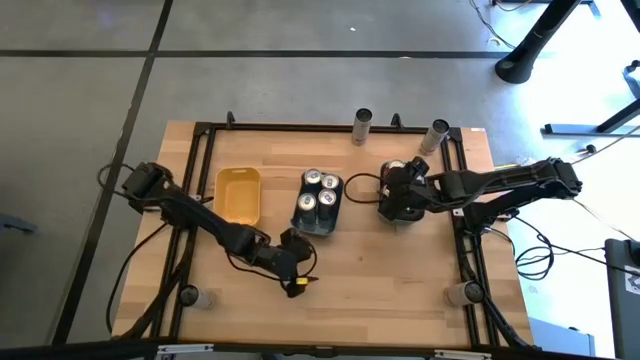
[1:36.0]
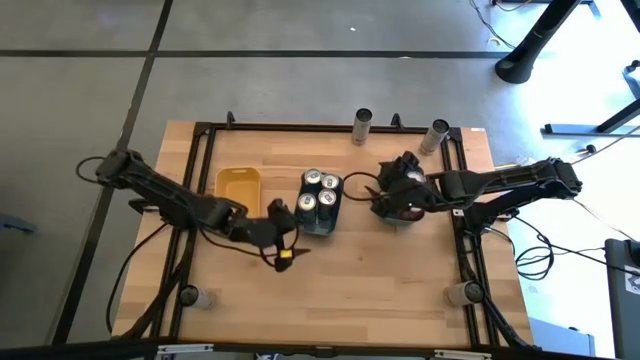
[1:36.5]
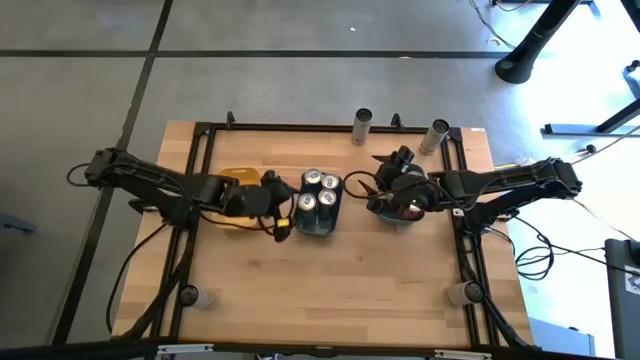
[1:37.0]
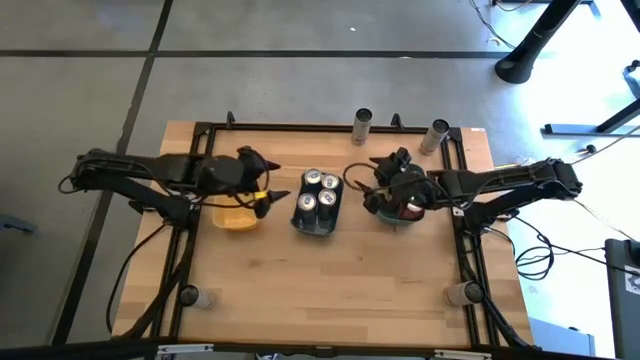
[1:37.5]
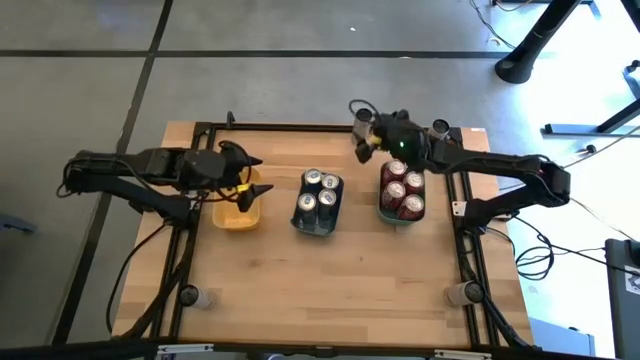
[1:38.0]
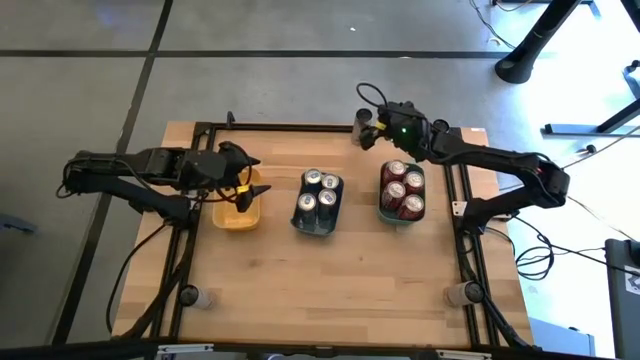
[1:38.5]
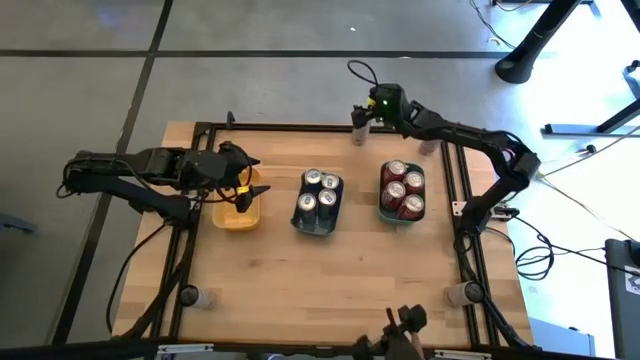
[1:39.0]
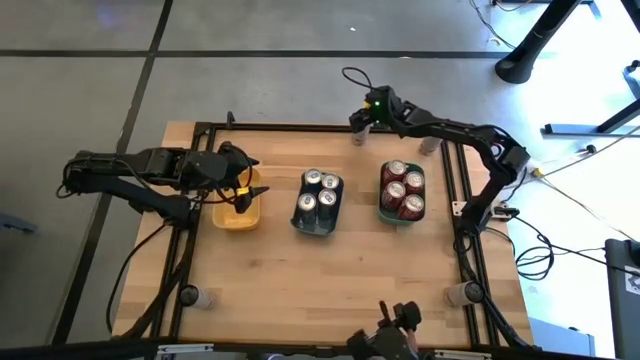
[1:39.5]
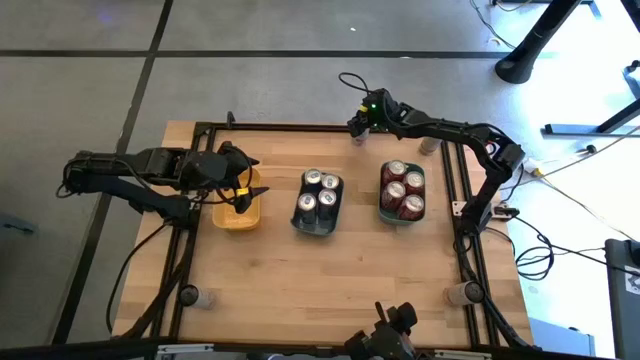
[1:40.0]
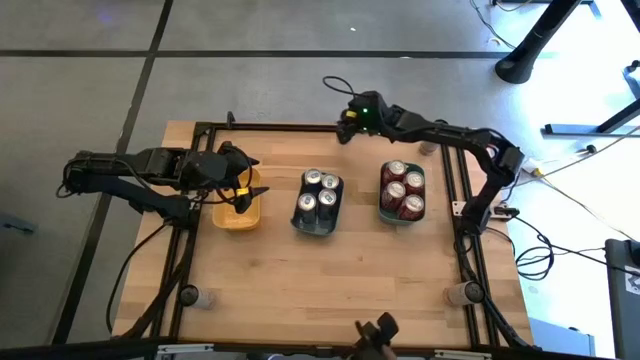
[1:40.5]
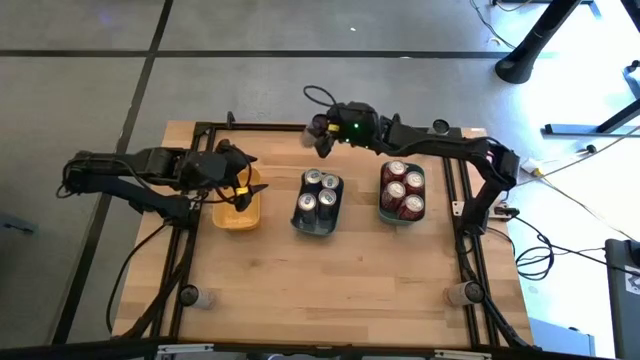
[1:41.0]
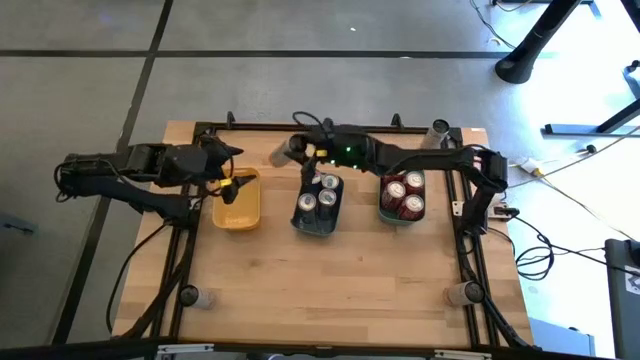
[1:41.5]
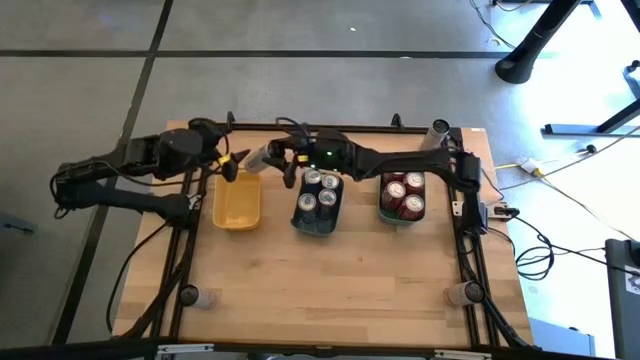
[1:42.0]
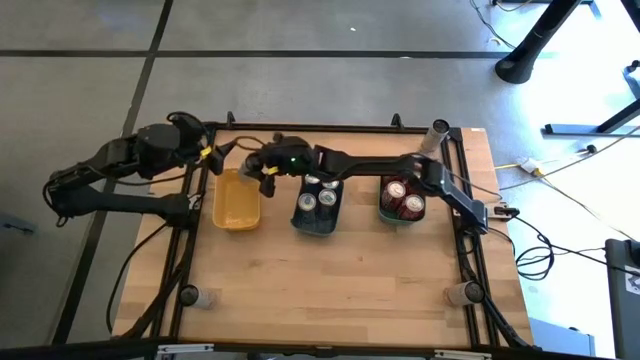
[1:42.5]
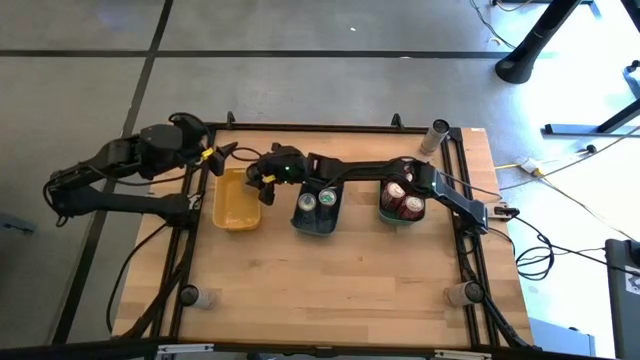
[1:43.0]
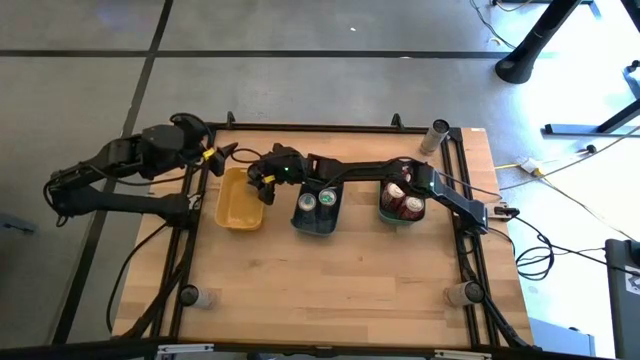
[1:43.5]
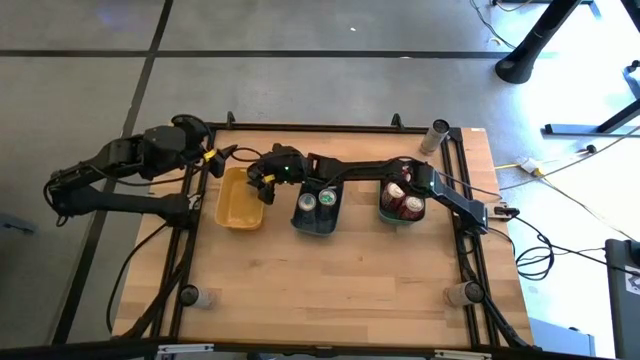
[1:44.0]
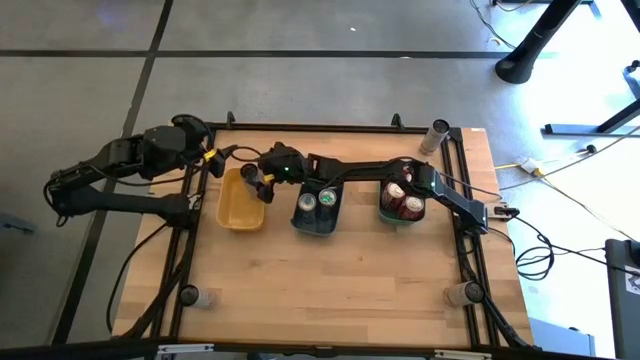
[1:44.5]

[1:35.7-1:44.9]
Task: Sort soda cans
Put the white pink soda can into yellow bin

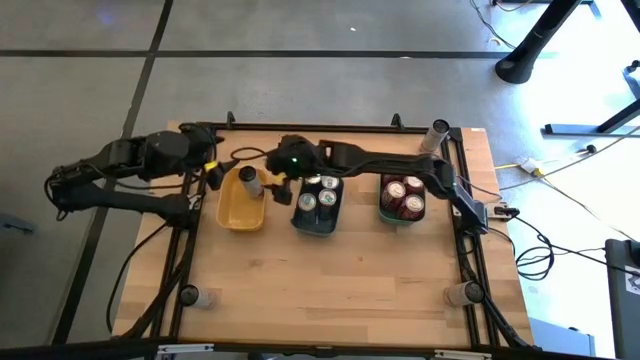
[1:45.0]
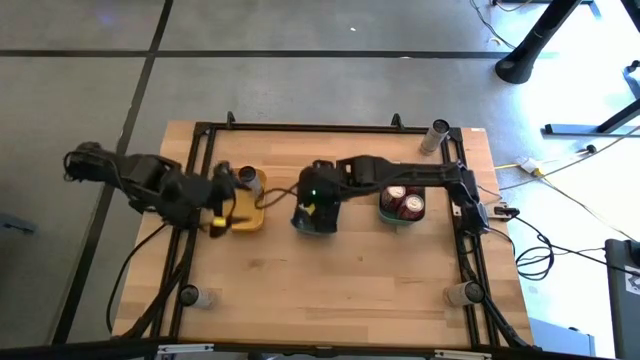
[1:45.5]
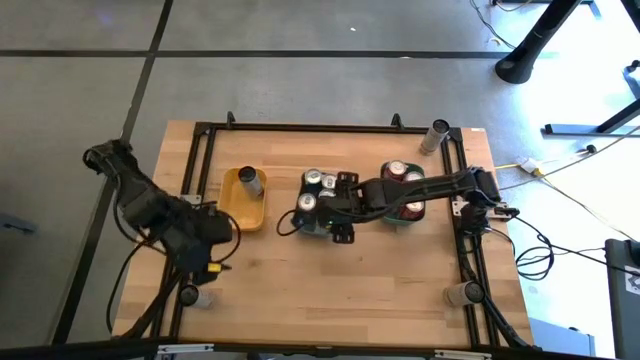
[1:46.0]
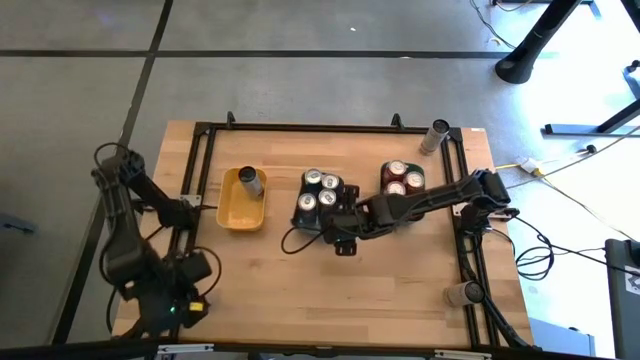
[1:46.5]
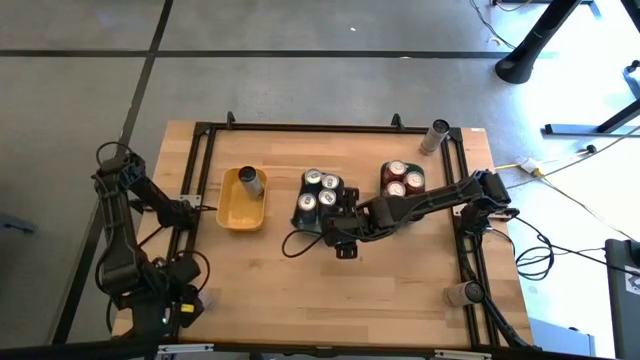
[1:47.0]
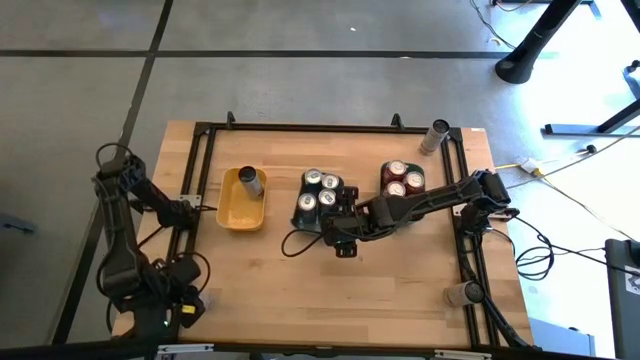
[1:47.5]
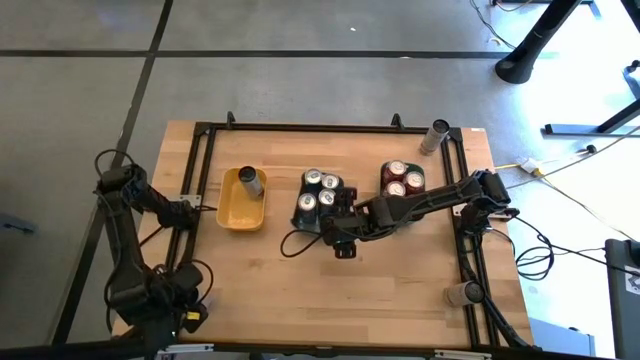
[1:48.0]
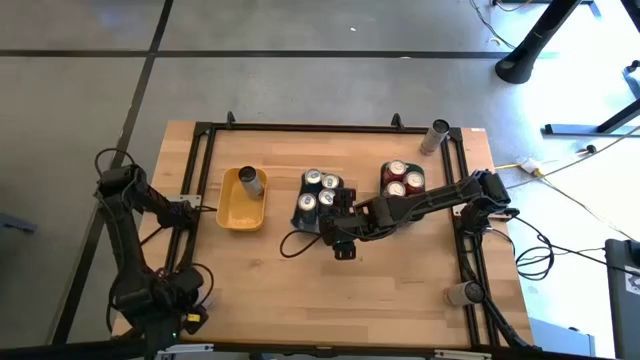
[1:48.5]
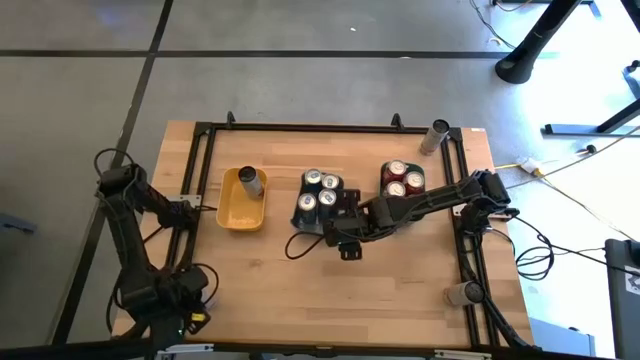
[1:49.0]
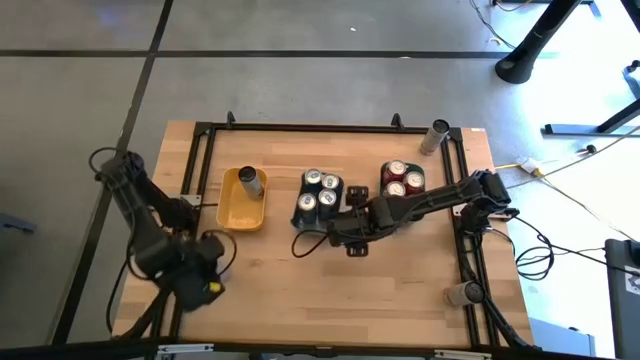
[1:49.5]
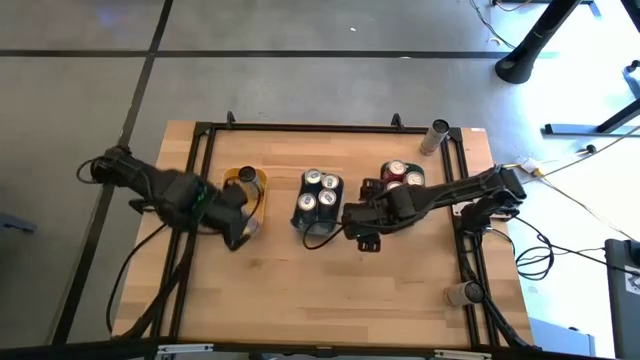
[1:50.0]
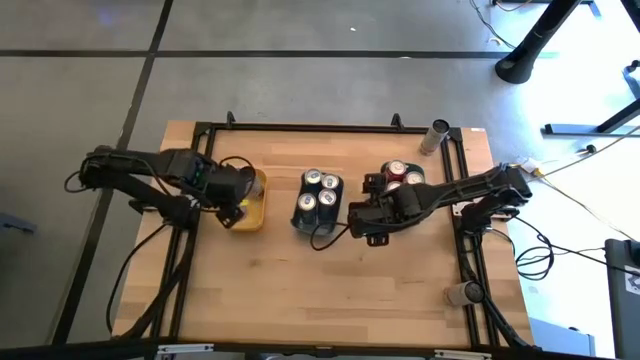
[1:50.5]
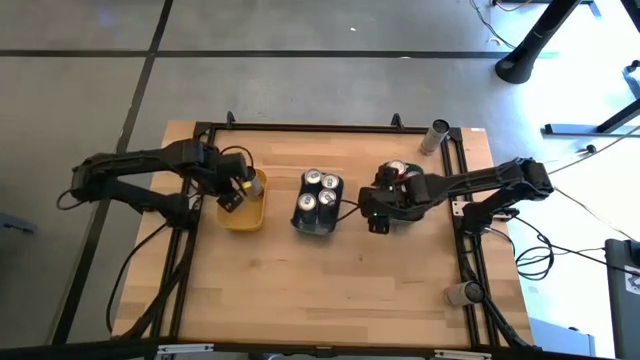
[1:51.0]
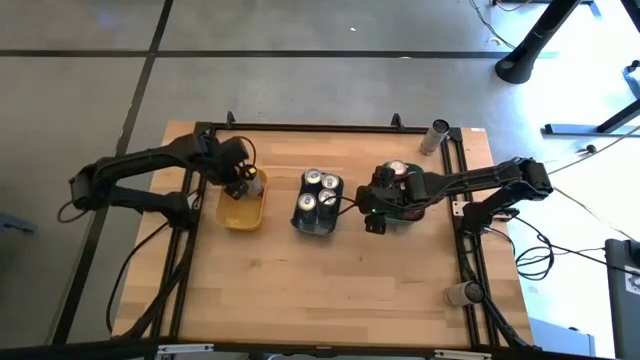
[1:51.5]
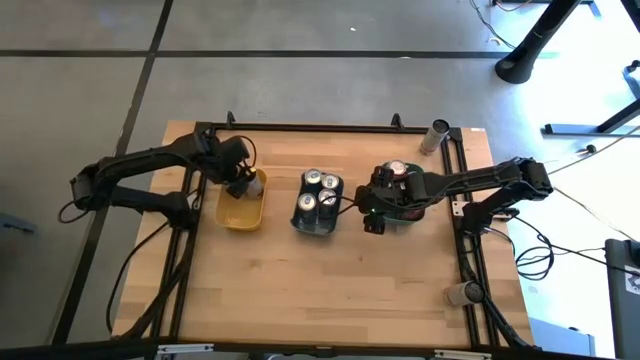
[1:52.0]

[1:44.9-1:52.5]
Put the white pink soda can into yellow bin

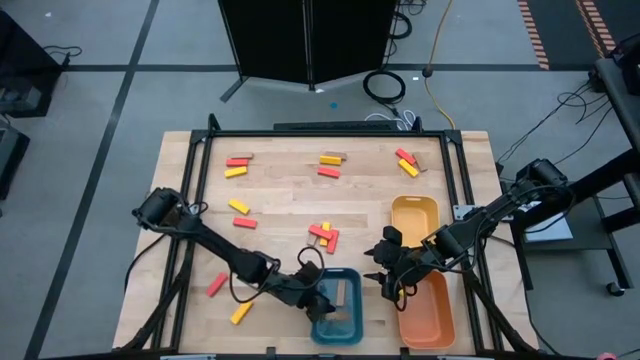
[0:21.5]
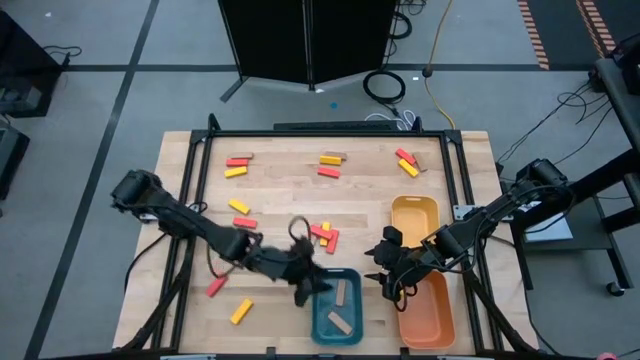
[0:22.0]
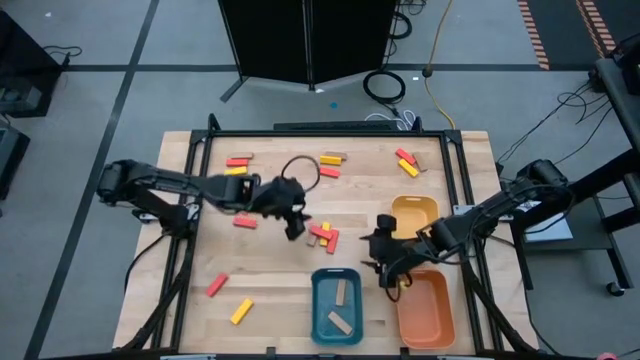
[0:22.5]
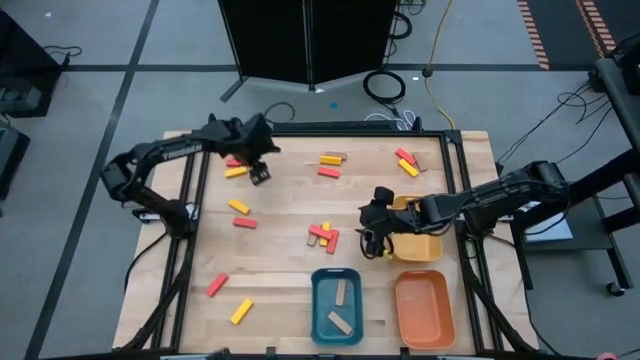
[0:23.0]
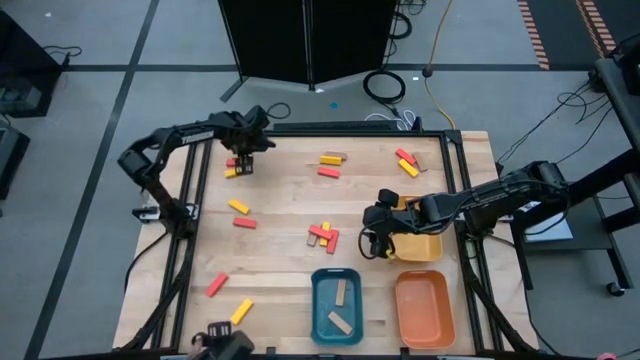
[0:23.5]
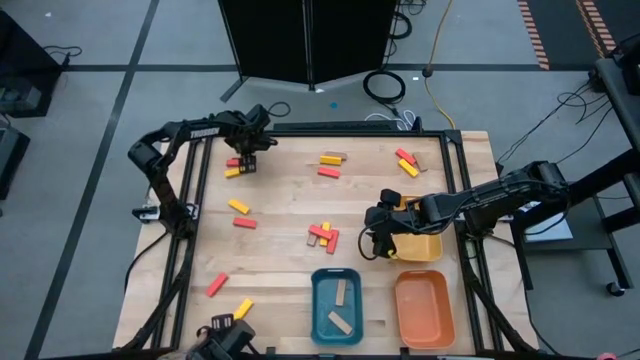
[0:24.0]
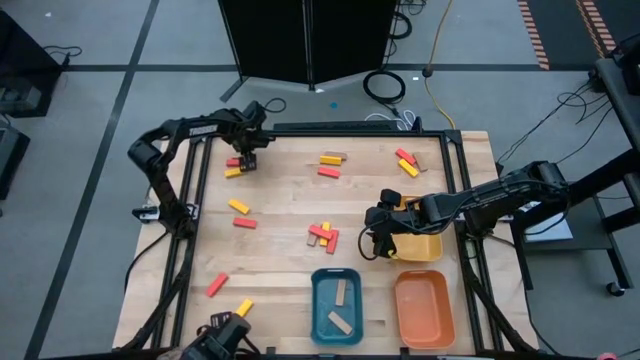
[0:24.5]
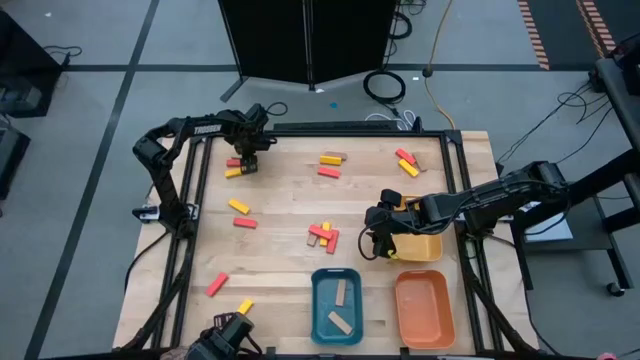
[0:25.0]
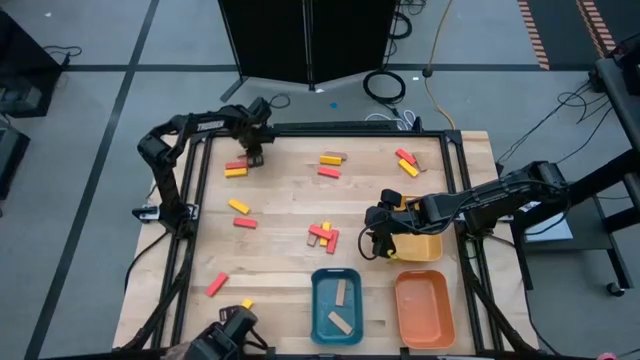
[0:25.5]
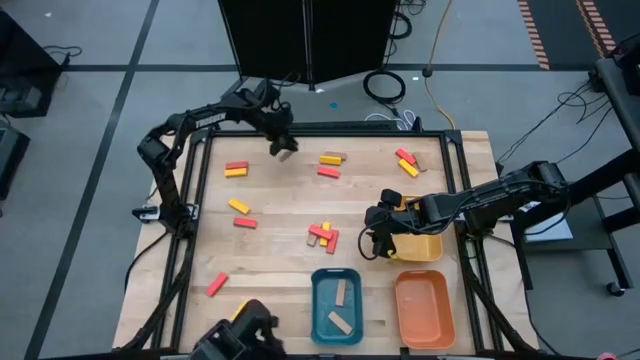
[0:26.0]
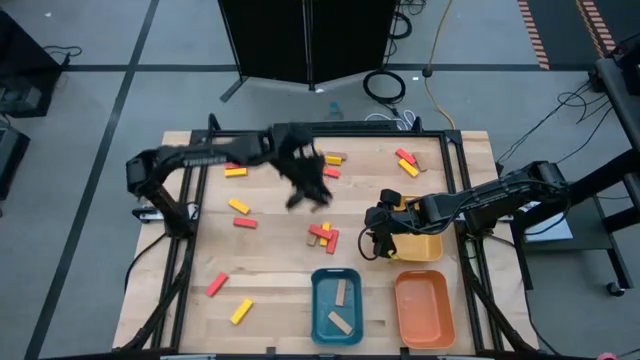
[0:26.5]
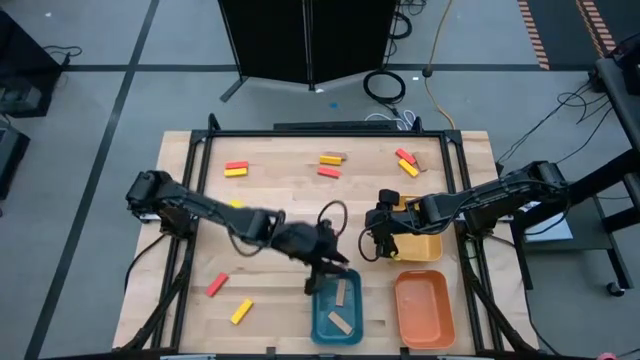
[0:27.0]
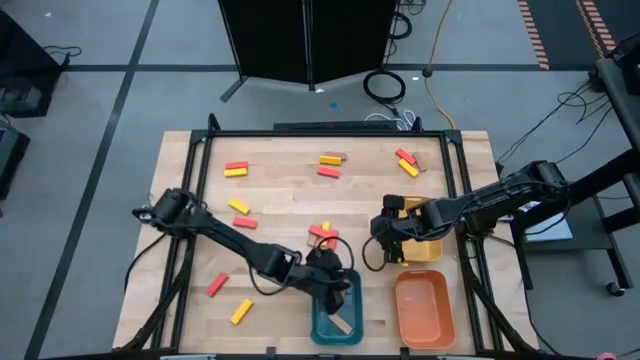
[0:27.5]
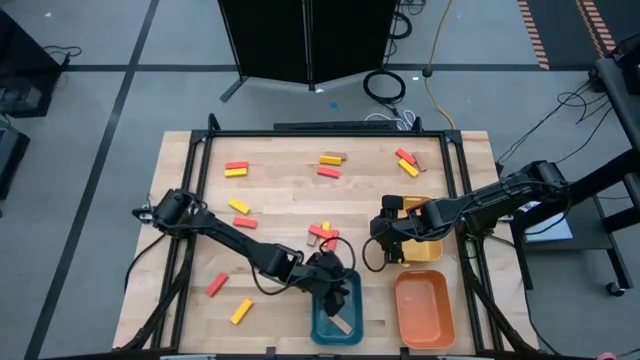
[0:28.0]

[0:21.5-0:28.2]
Task: Sort blocks
Put the brown block into the blue bin
